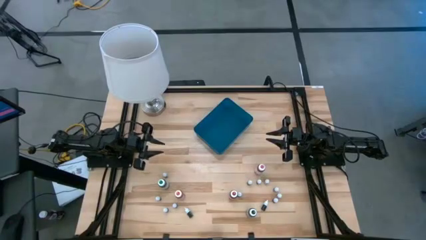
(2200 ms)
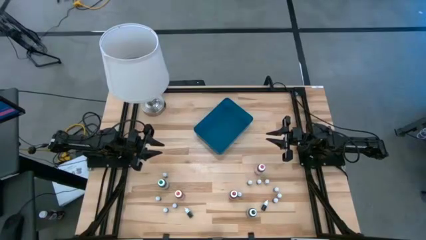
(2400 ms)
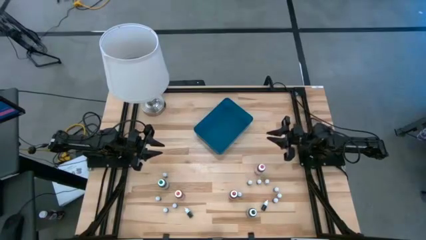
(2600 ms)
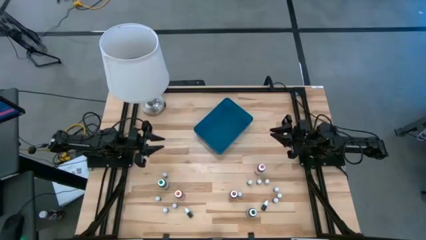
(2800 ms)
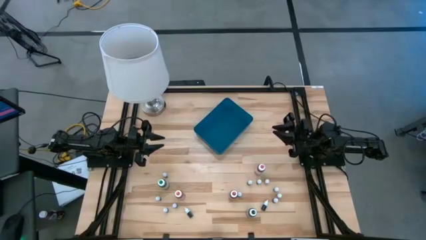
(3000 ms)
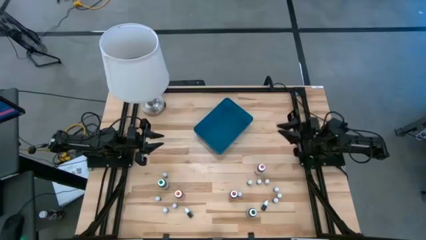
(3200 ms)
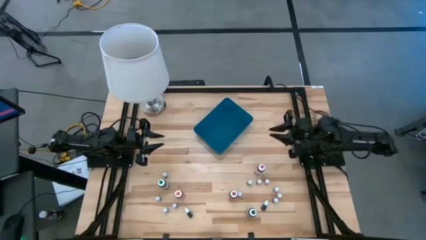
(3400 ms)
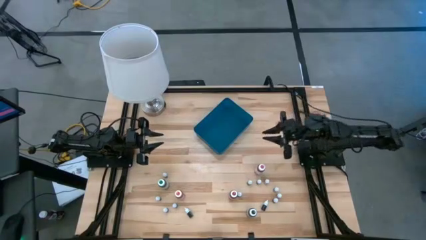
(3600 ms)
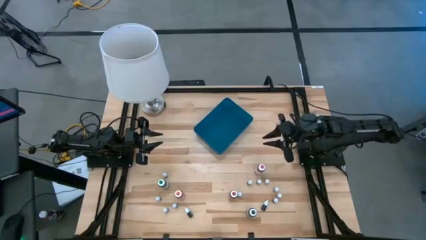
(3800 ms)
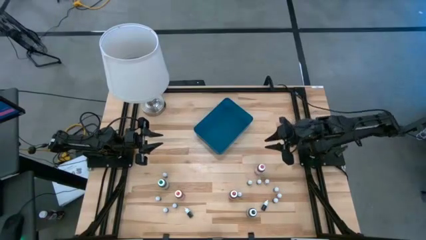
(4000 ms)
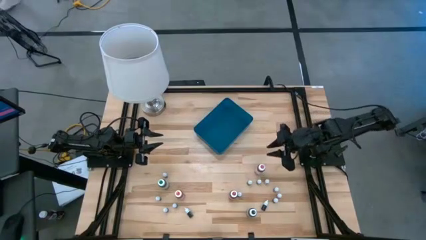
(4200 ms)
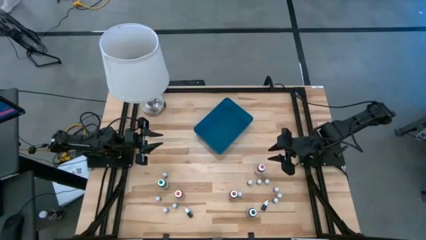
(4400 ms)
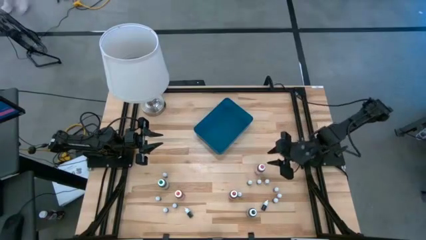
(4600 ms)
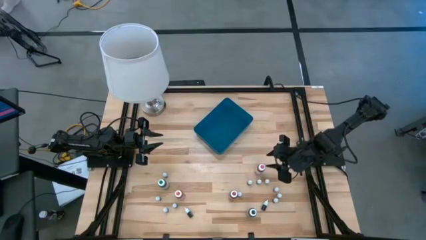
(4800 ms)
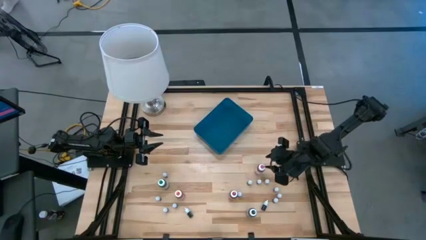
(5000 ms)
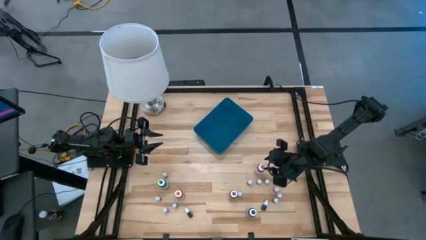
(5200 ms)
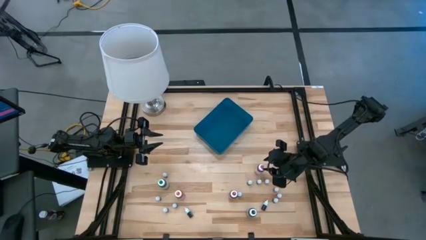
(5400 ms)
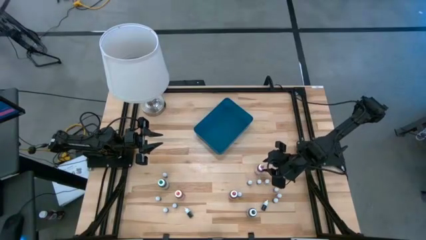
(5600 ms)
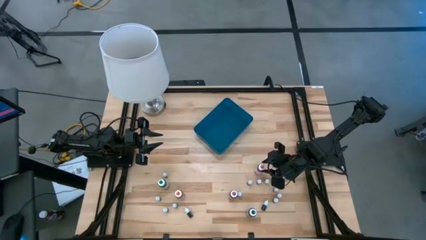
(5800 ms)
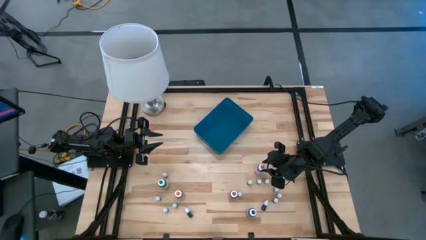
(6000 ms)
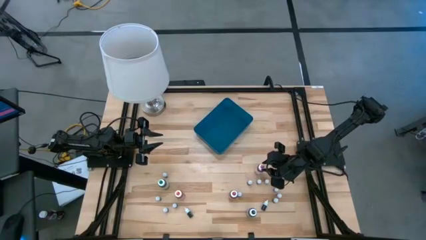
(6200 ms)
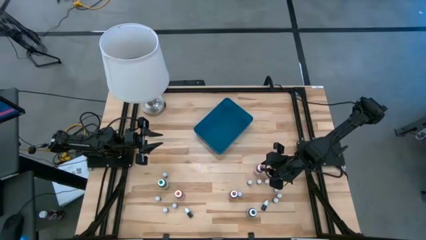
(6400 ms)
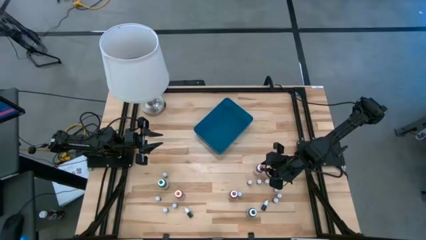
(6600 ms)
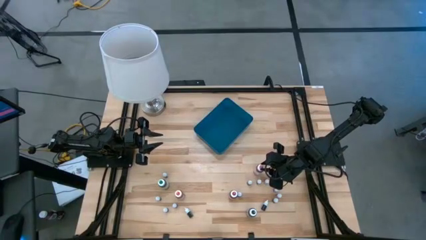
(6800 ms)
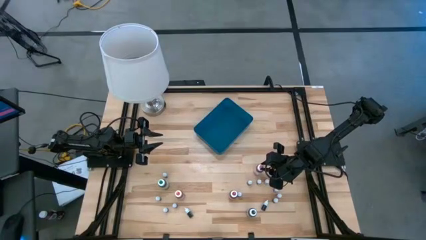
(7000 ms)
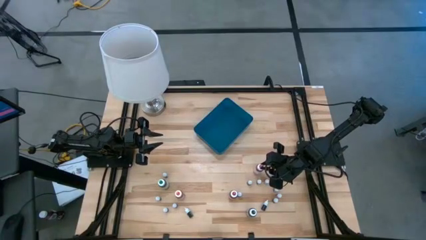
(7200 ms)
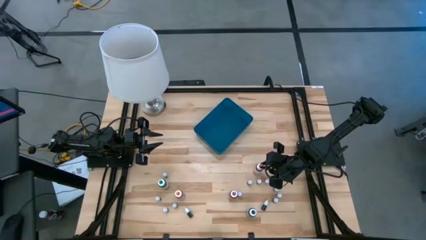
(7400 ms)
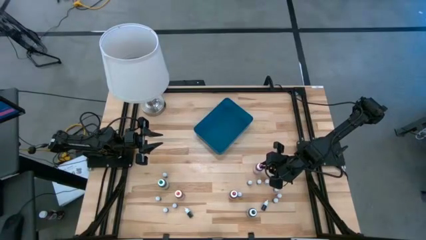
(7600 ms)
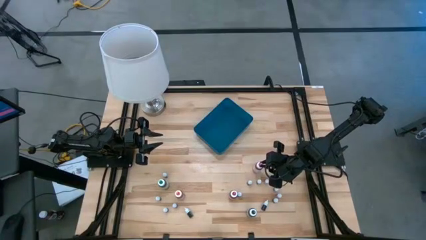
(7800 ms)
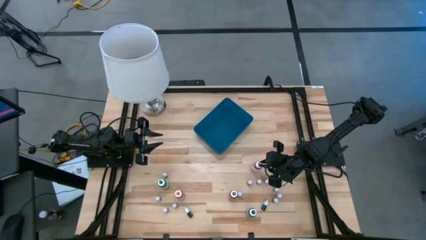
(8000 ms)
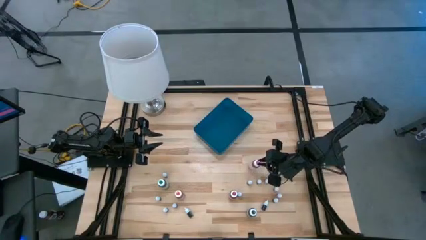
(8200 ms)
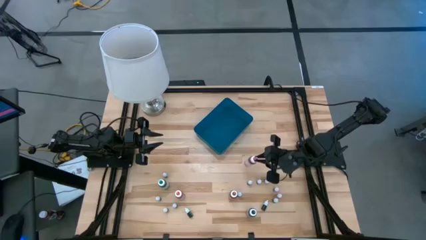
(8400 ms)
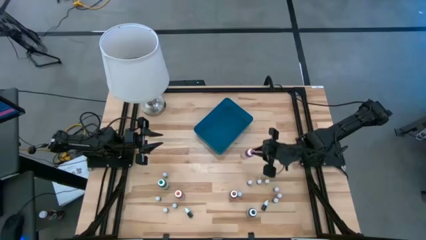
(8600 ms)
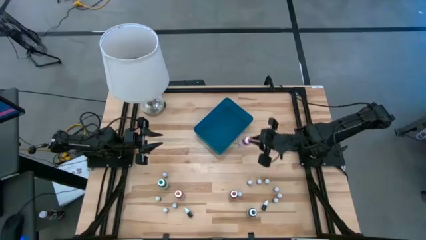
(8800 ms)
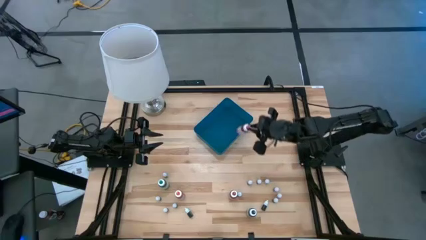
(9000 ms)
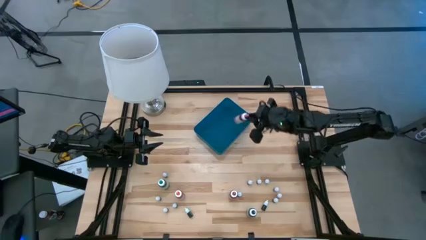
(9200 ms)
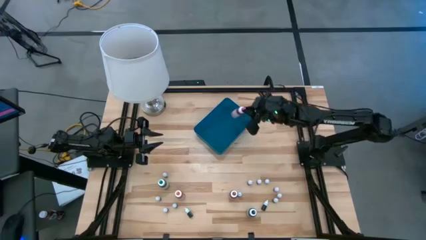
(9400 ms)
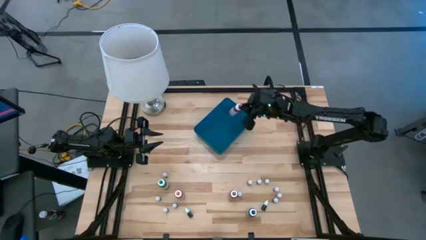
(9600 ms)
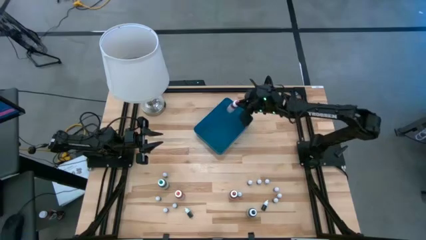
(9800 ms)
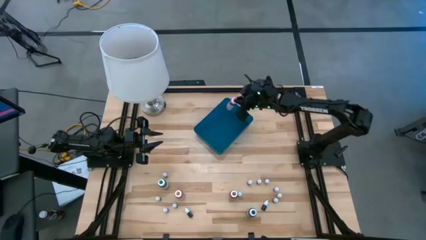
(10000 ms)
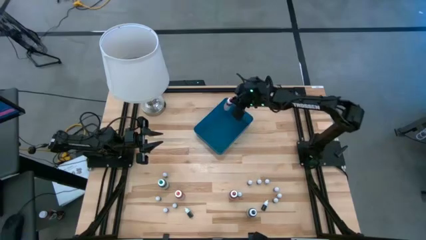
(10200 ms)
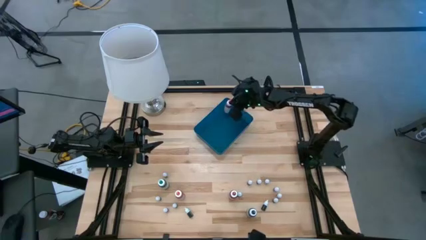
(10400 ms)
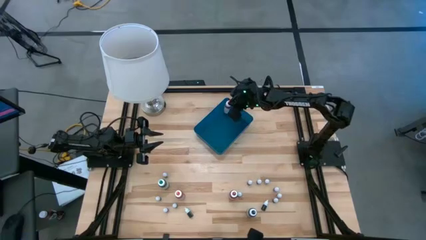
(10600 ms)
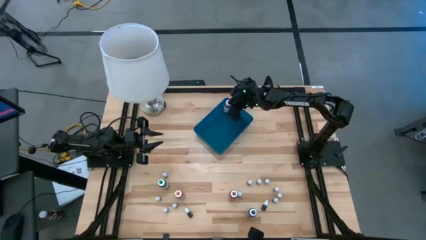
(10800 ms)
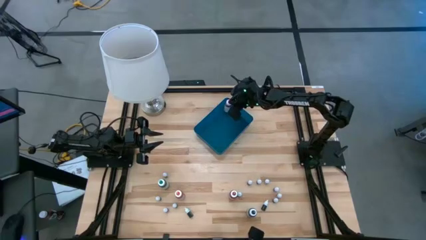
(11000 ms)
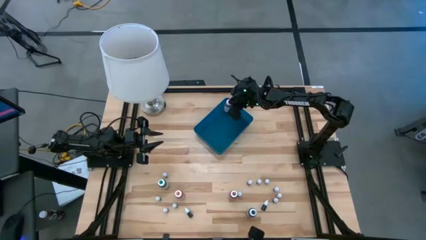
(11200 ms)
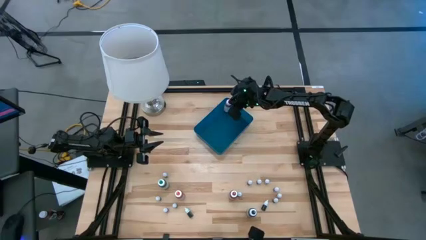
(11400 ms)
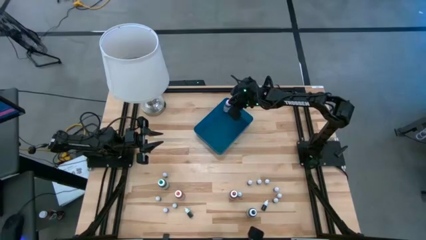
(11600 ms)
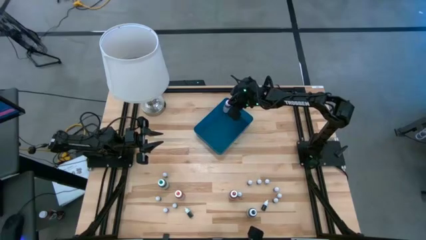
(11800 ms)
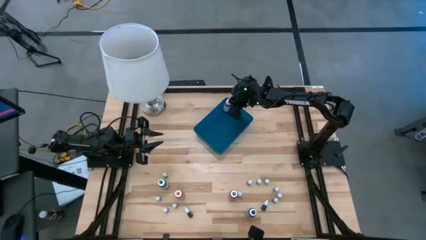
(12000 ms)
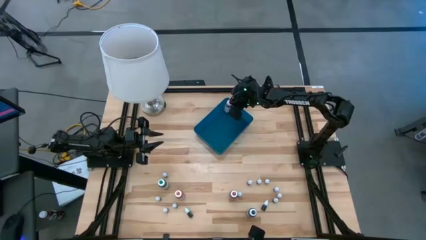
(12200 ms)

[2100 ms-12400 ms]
Task: Pick & Place food coloring
Put the large pink food coloring bottle into the blue container
